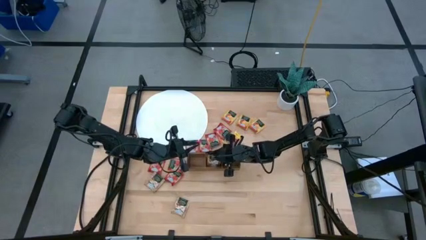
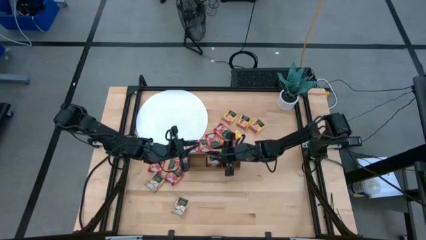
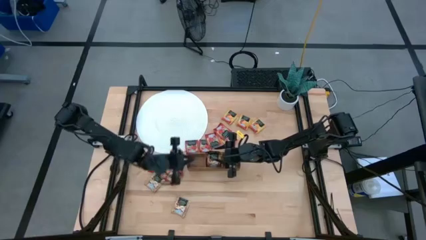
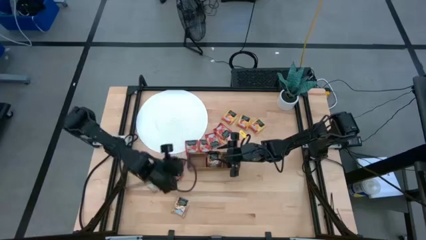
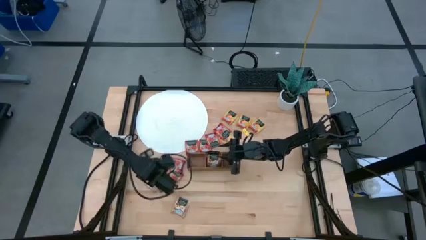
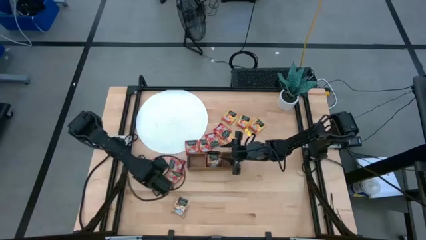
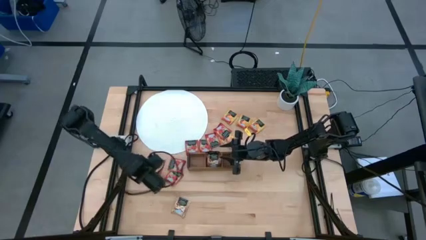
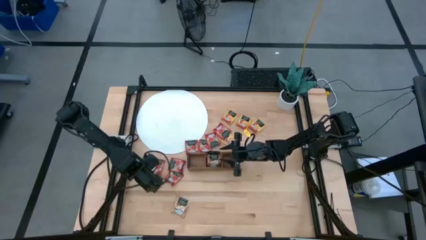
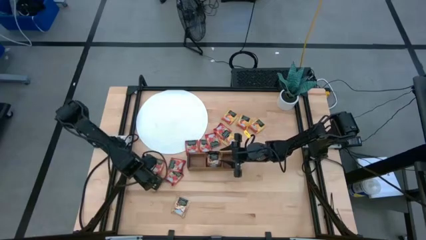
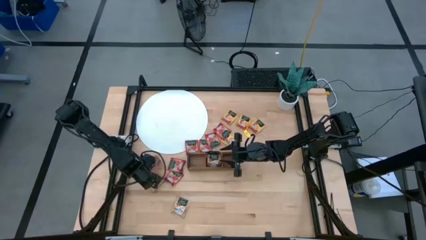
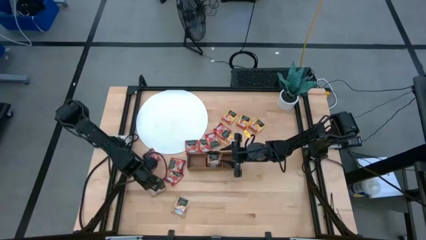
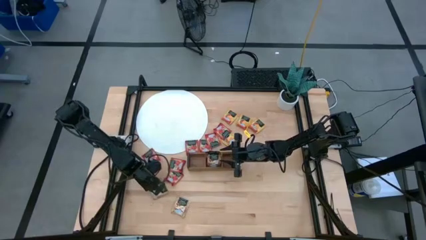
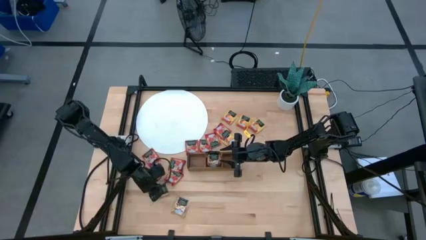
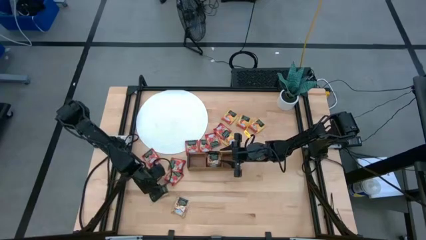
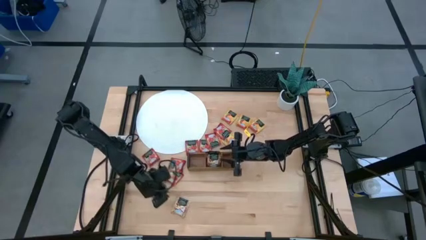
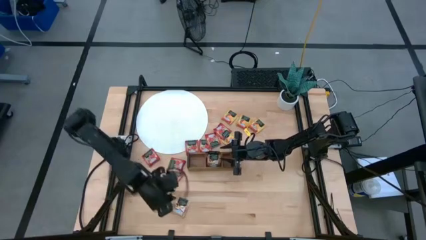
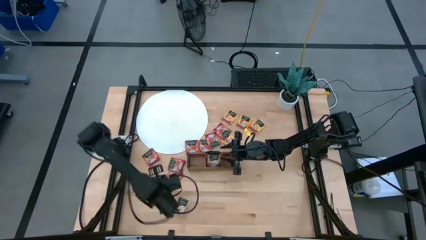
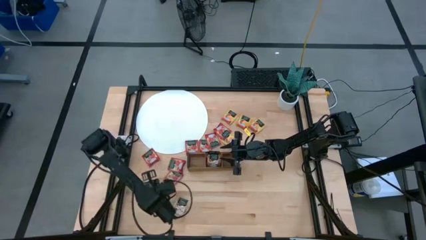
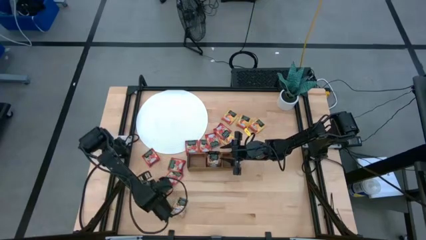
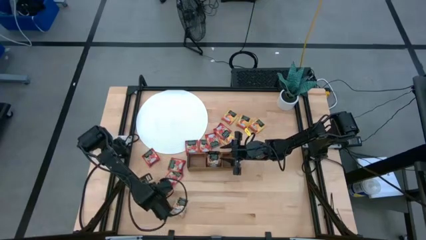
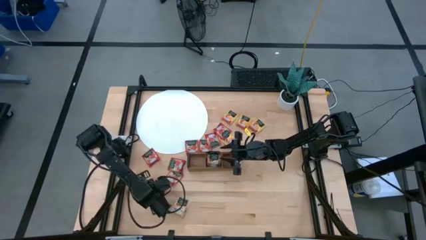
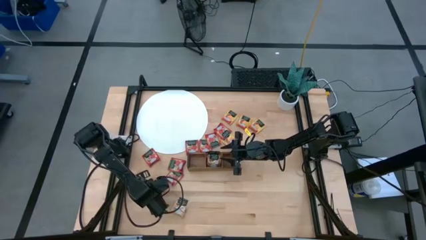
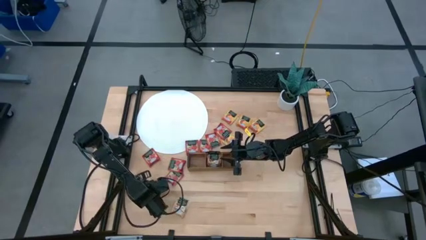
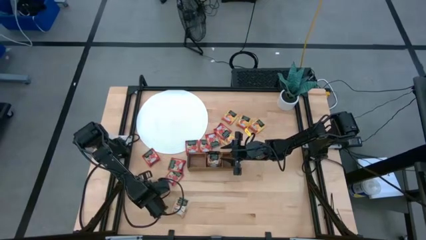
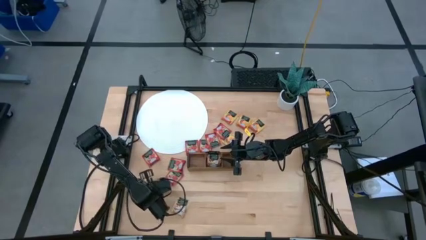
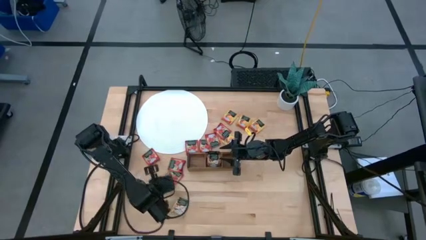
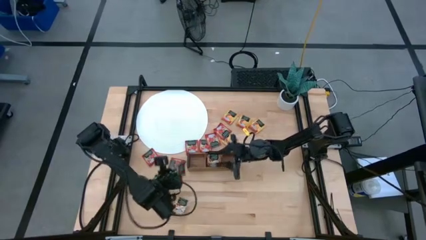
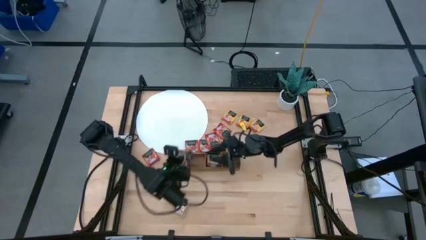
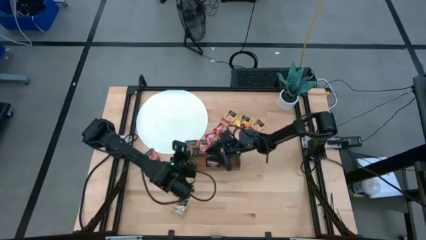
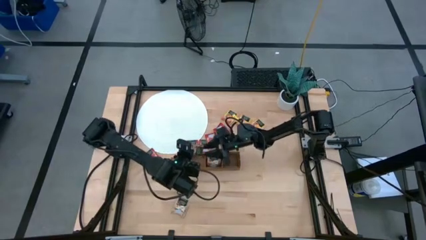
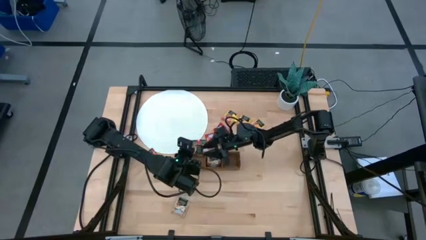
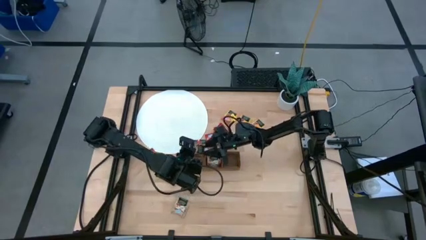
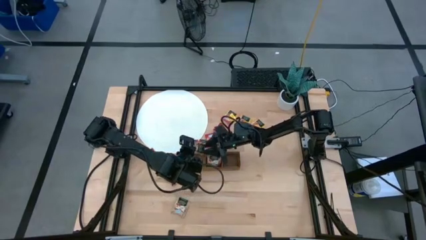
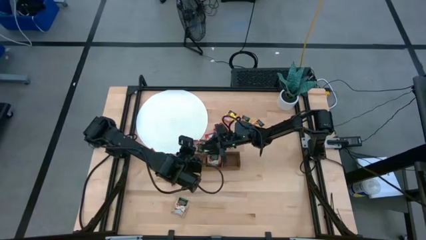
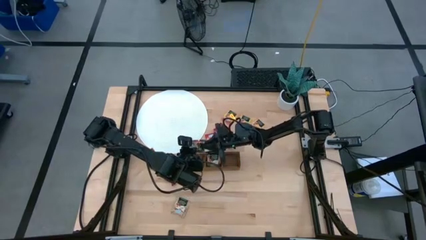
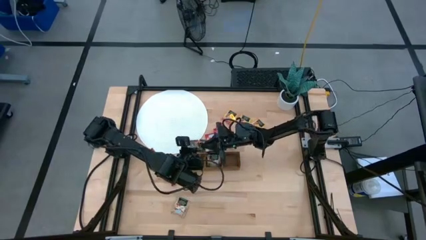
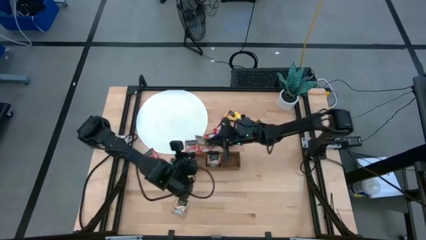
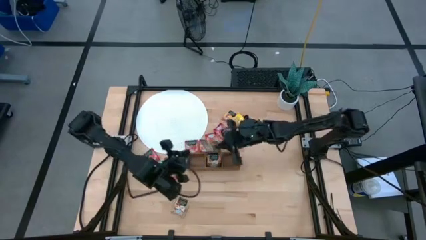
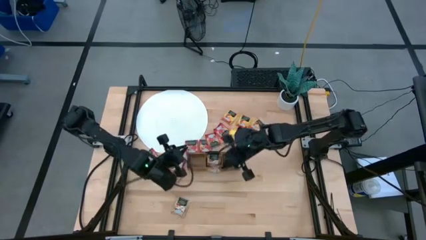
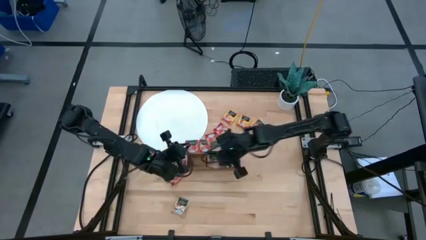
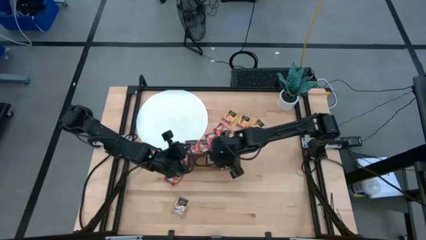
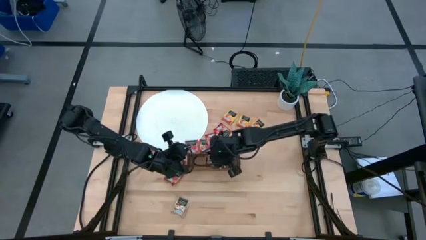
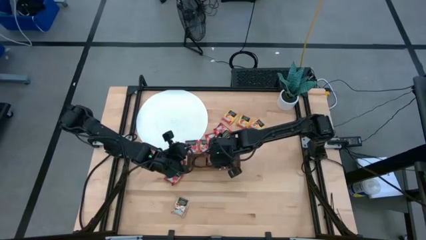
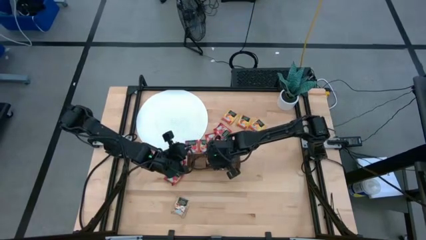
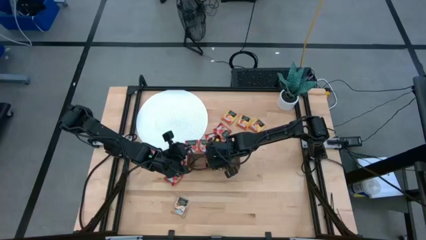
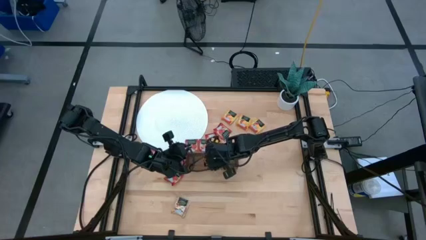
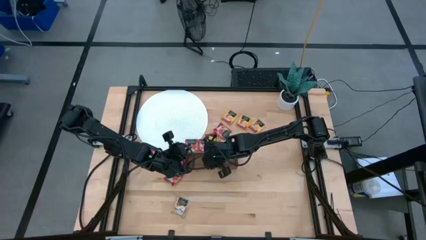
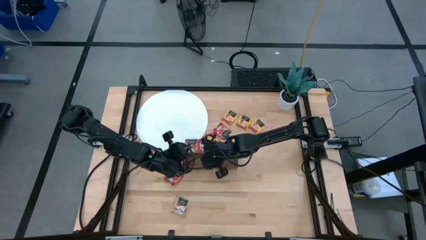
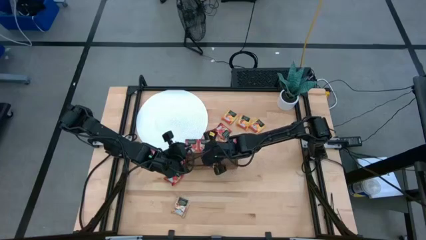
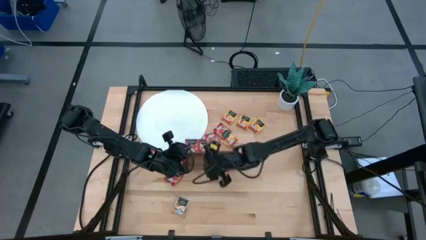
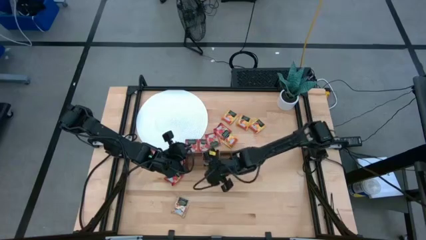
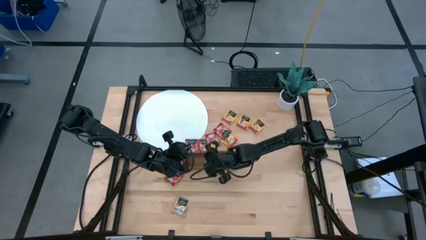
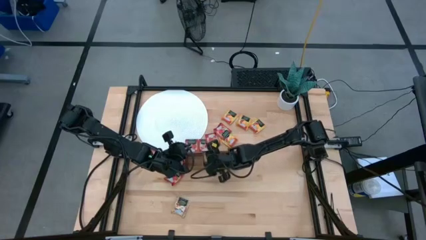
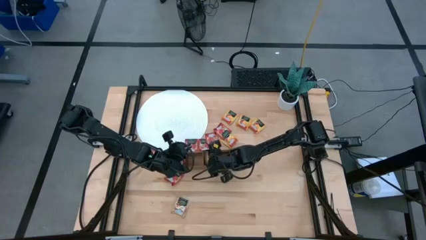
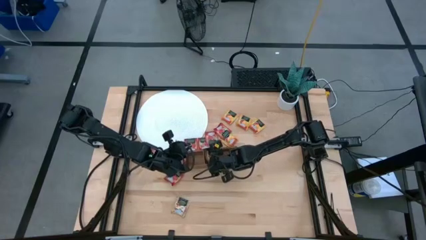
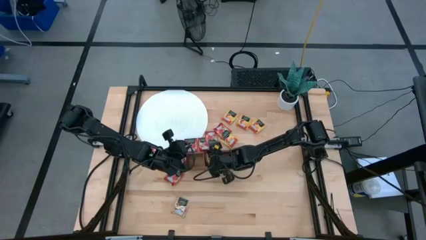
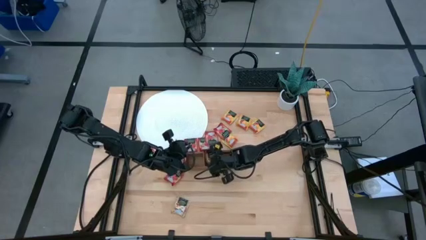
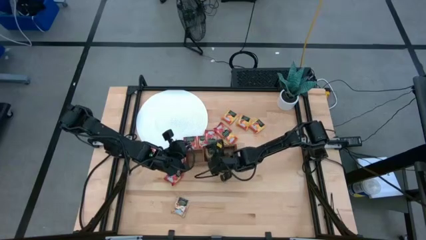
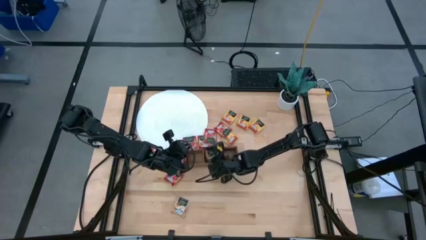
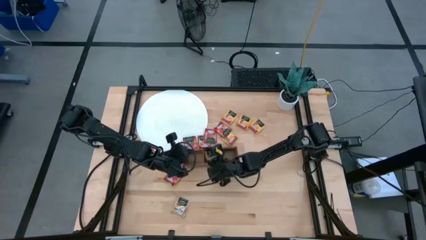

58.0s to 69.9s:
Task: Pick & Place Tea
Put the top brown tea bag into the middle section of the wooden organizer

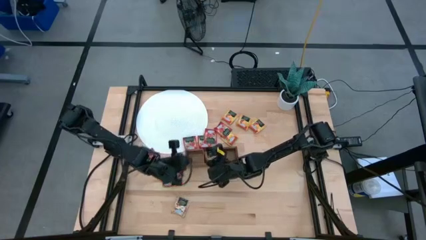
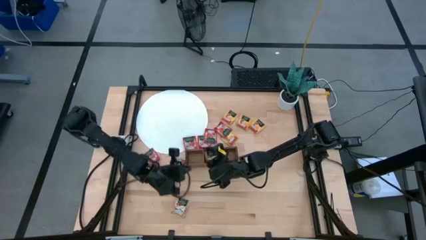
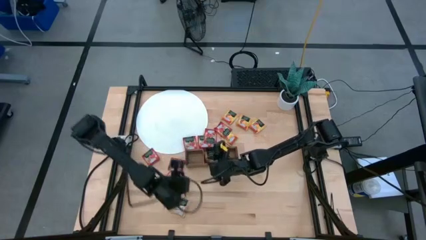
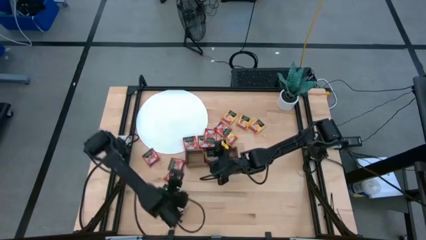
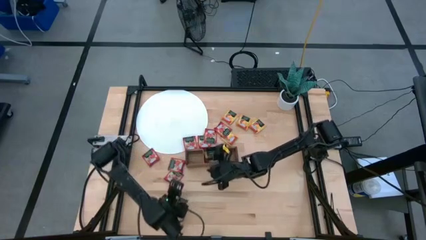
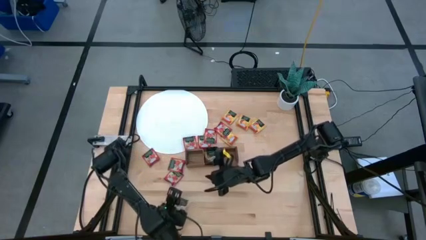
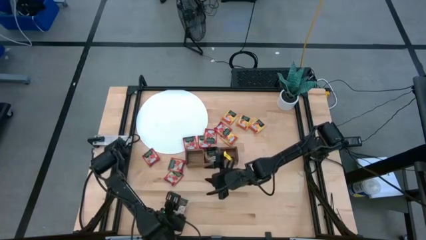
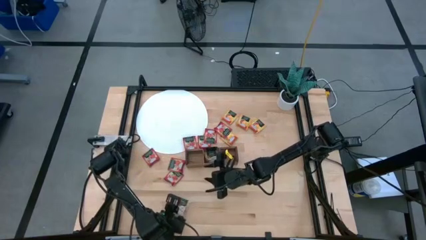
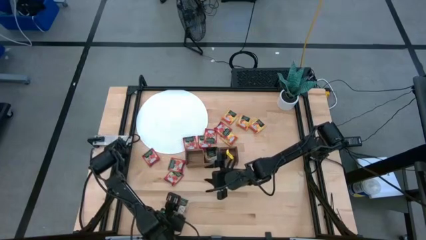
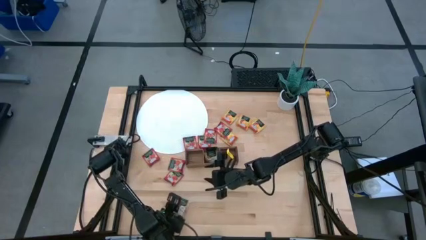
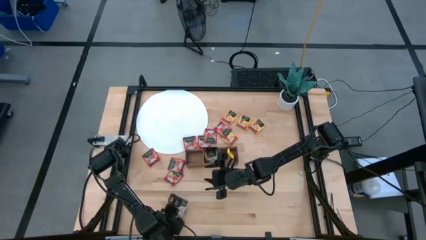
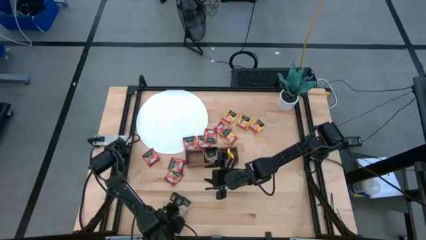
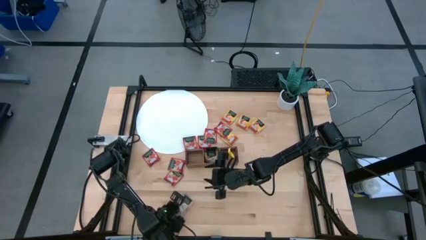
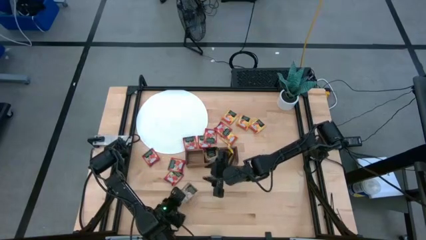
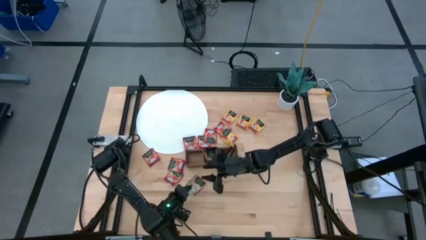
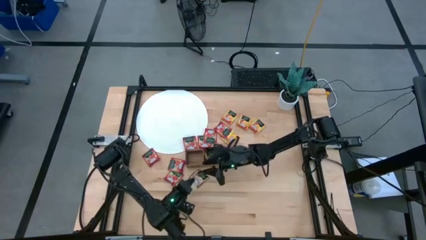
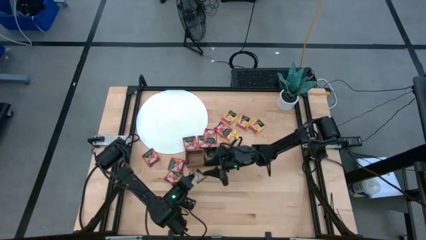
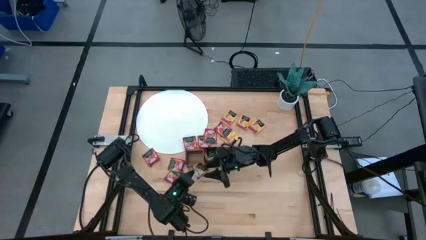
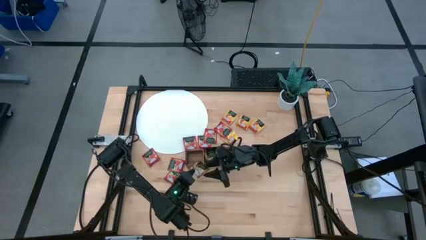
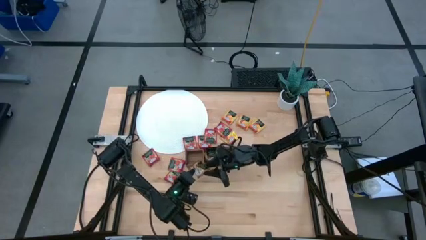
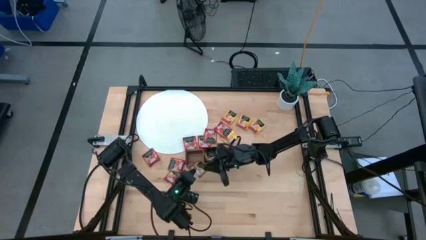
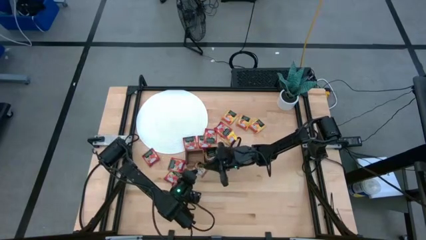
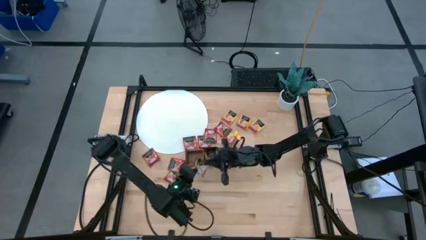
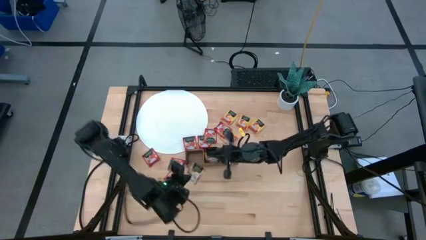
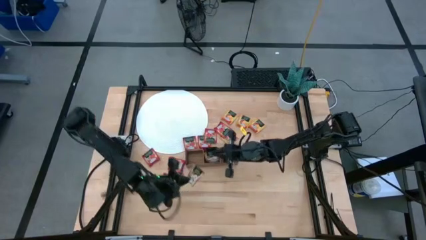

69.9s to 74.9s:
Put the brown tea bag into the middle section of the wooden organizer
